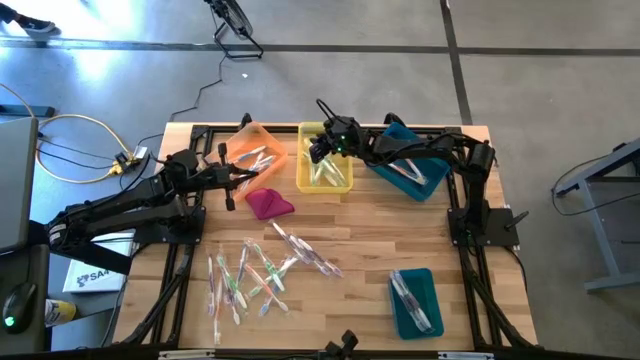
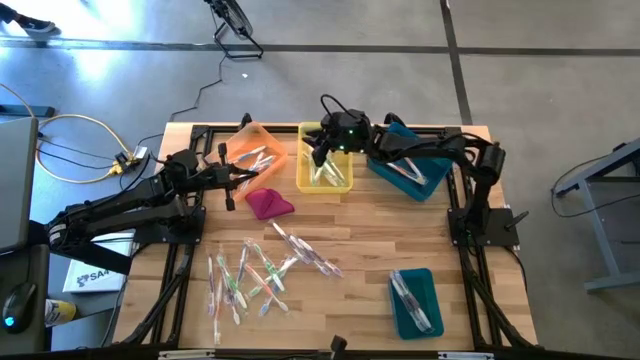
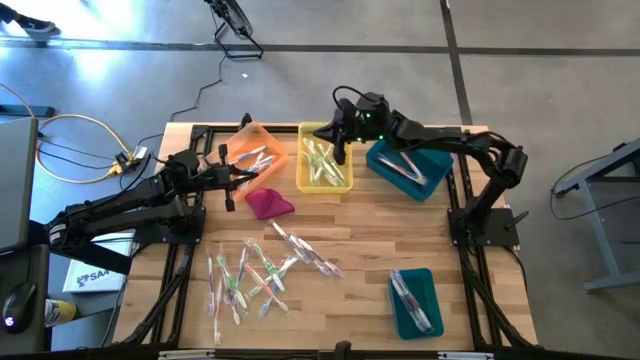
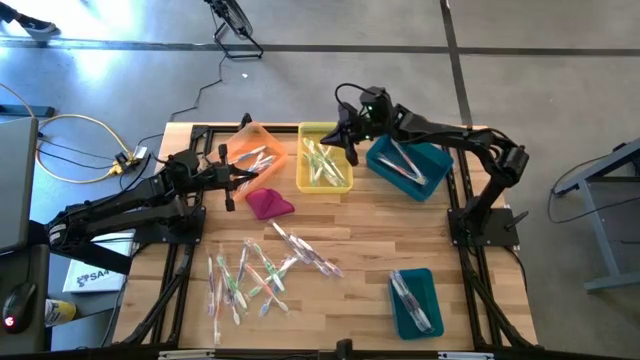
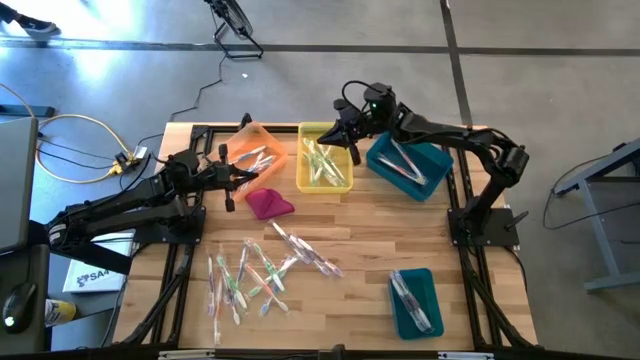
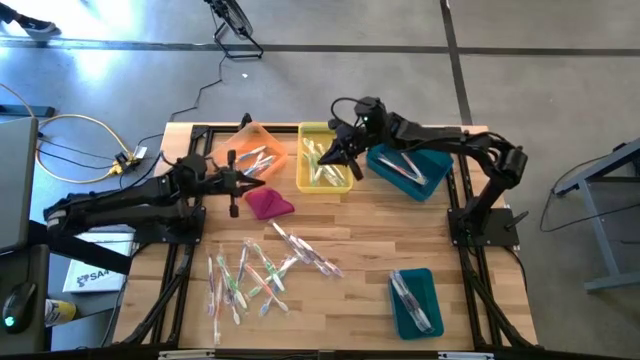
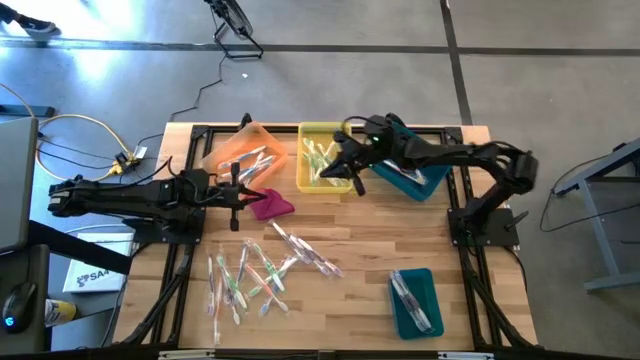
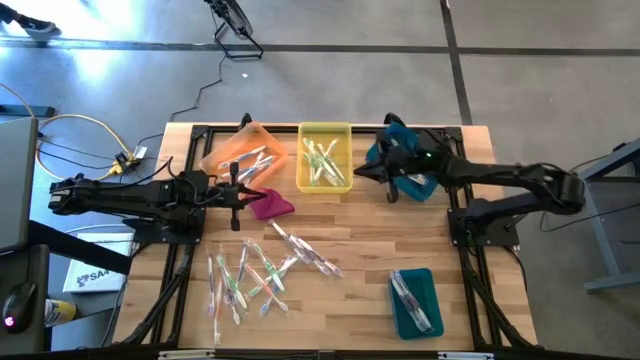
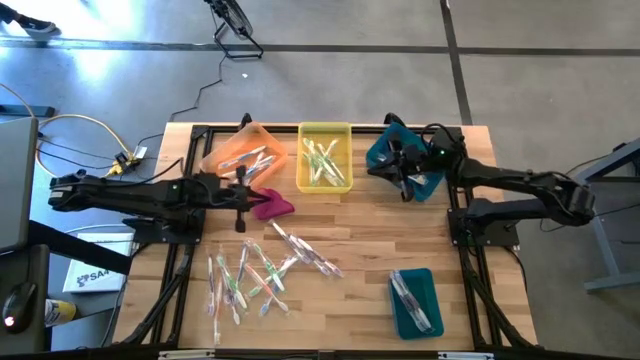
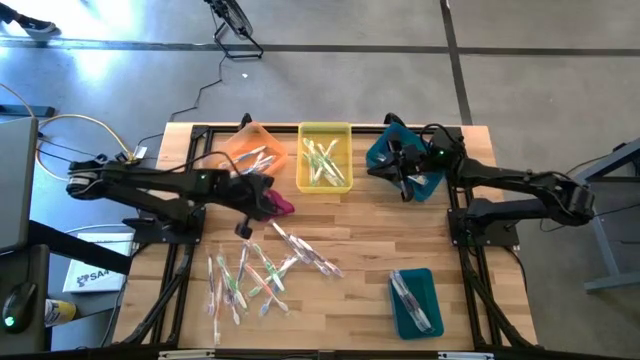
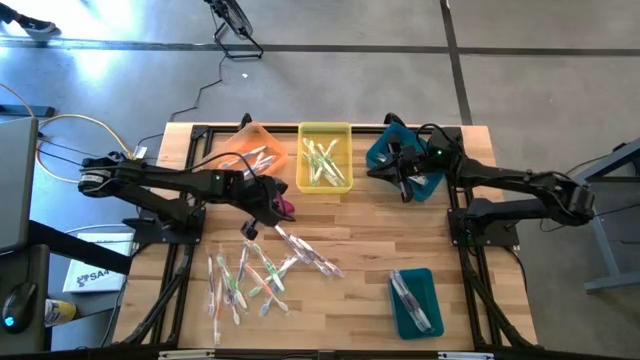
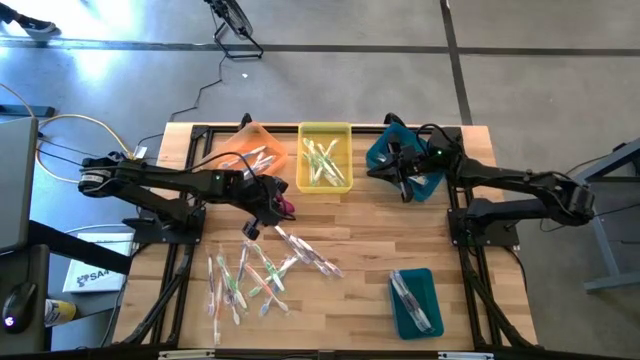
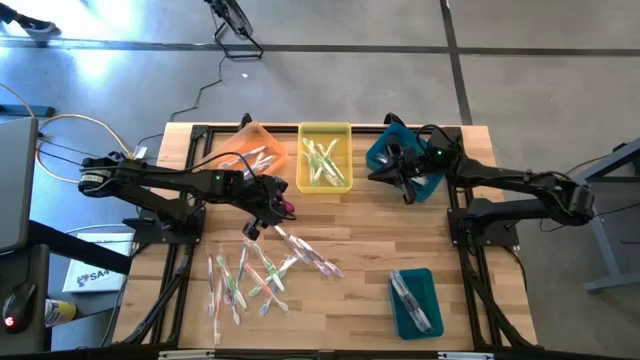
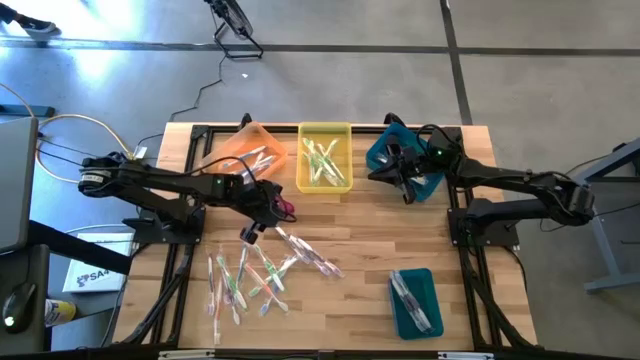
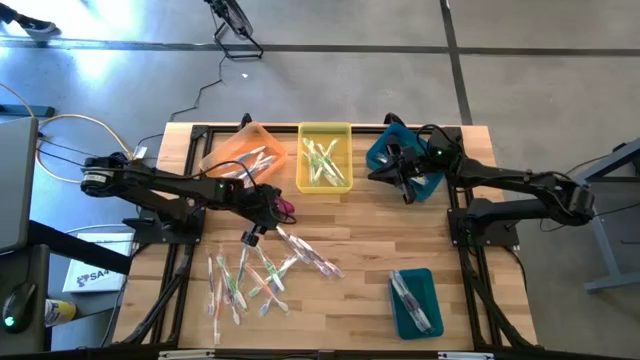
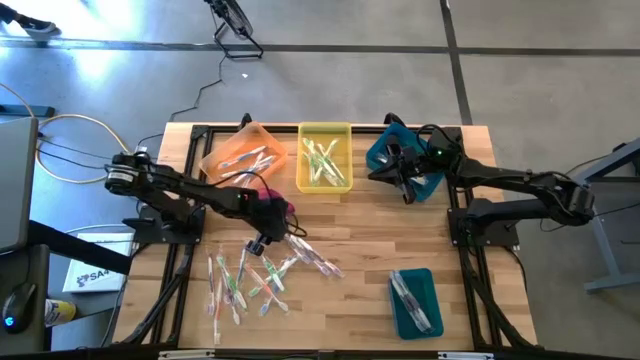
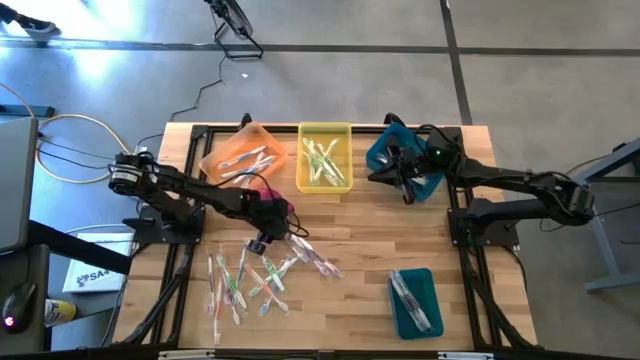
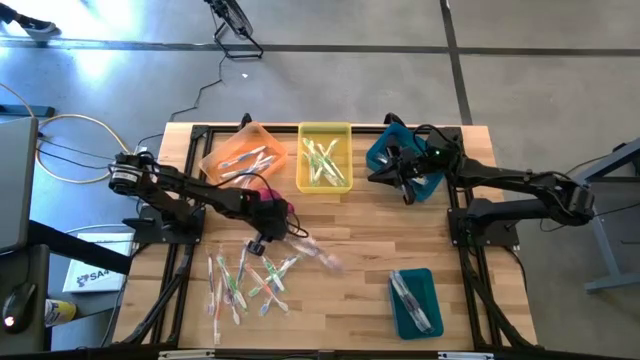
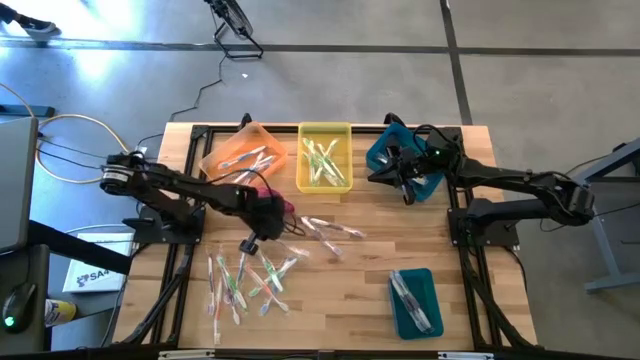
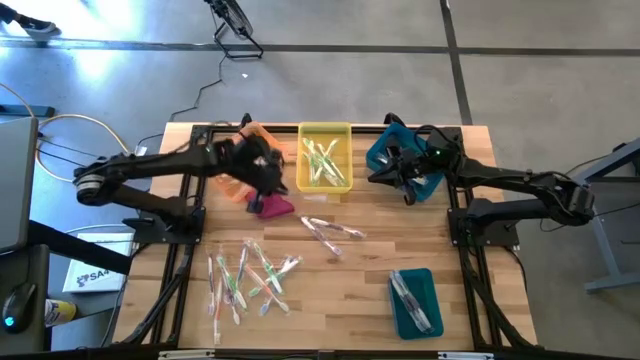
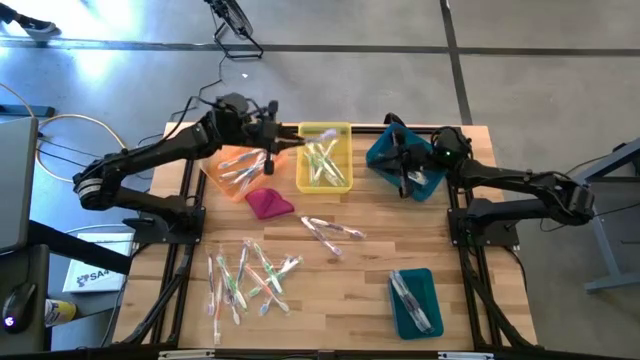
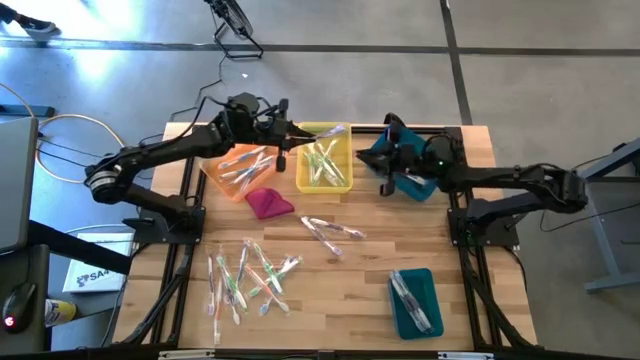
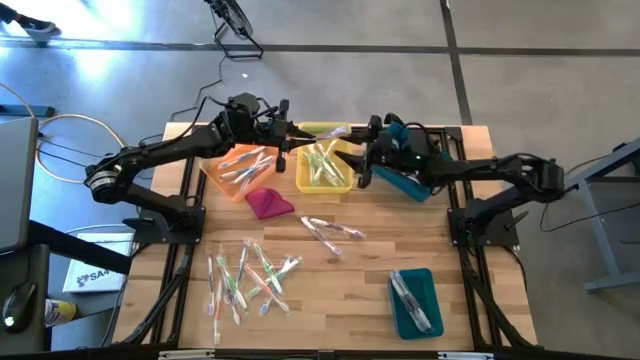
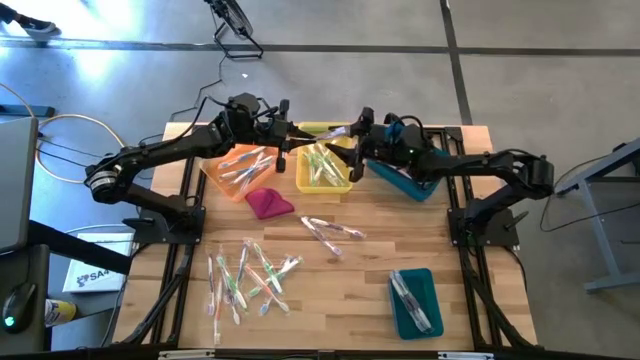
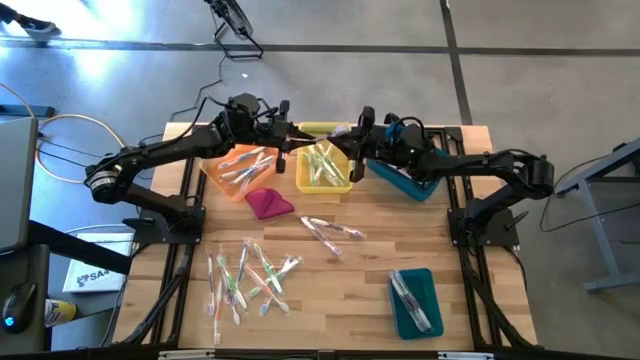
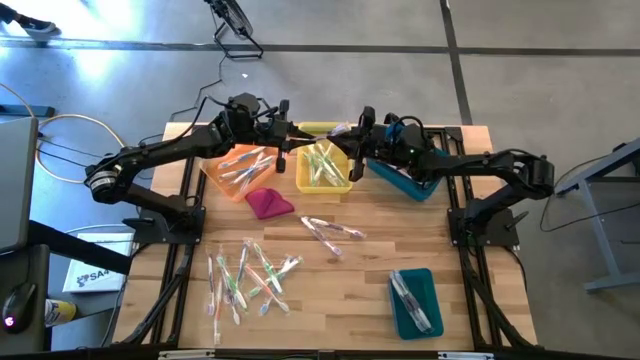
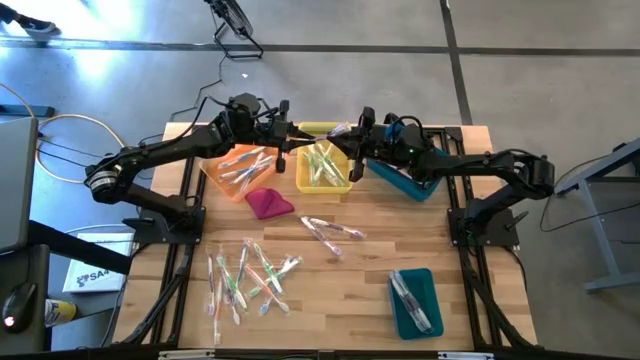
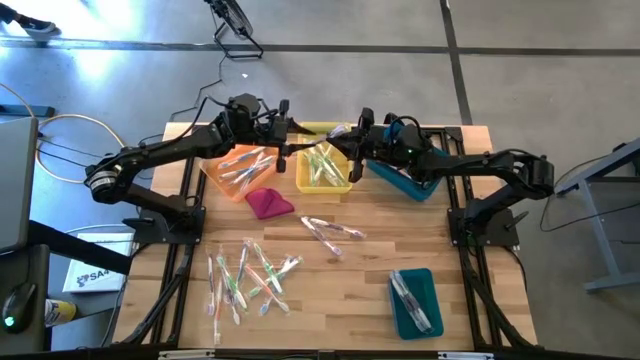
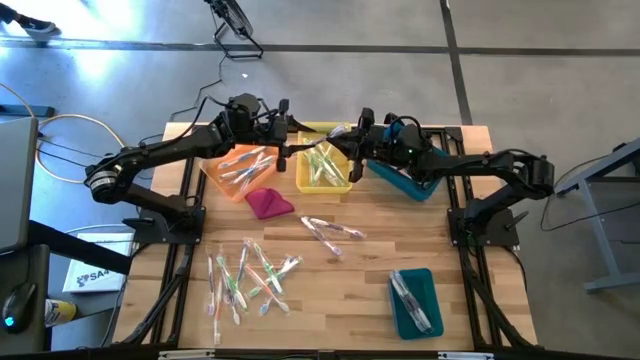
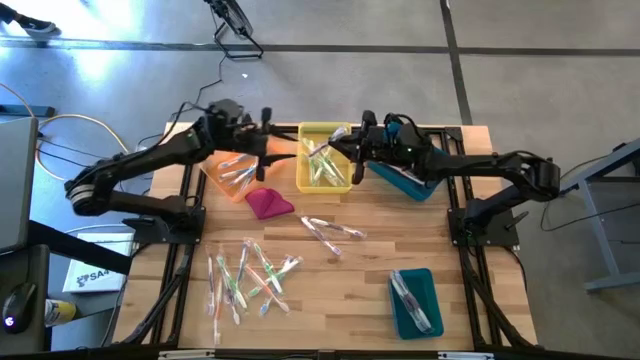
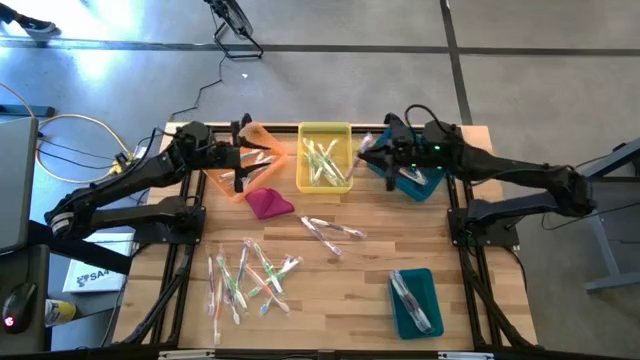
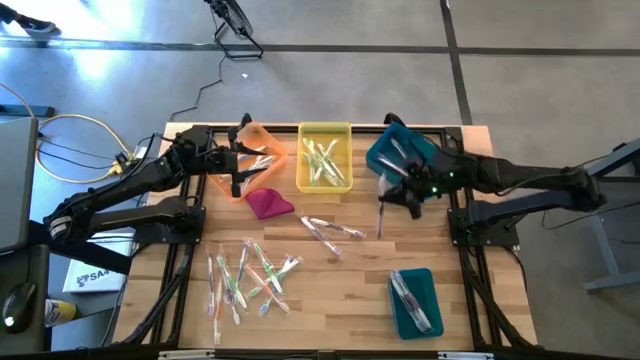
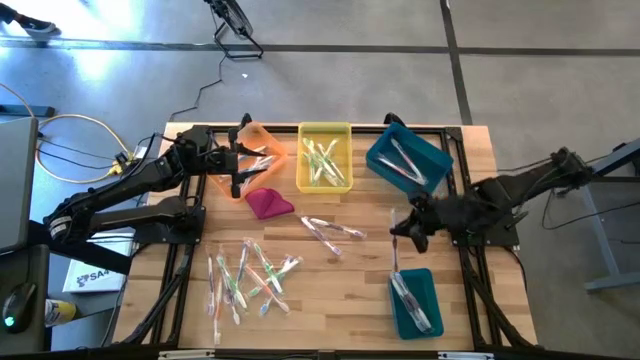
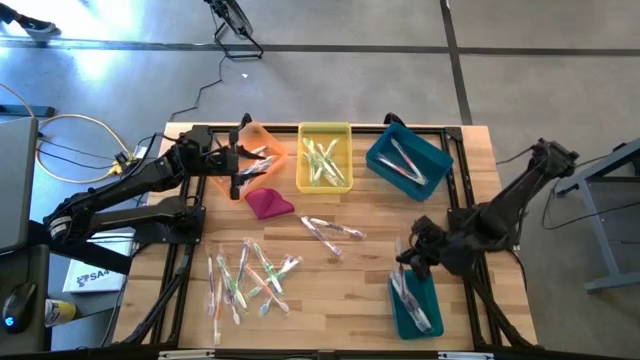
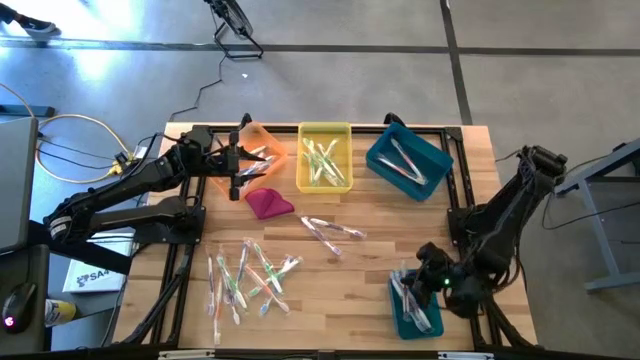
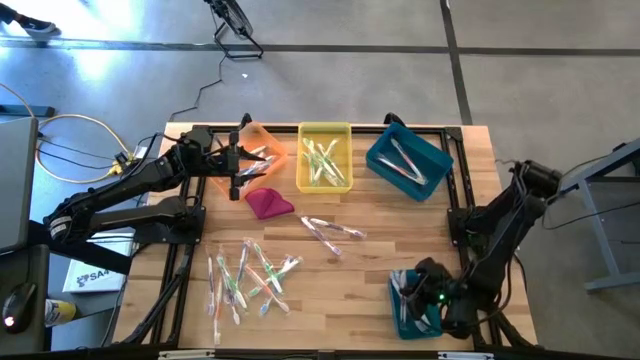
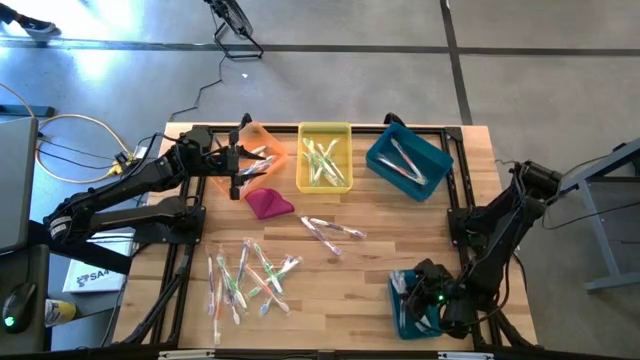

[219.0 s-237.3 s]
Task: Pick & Place Toothbrushes
Put the purple toothbrush into the bottom blue bin

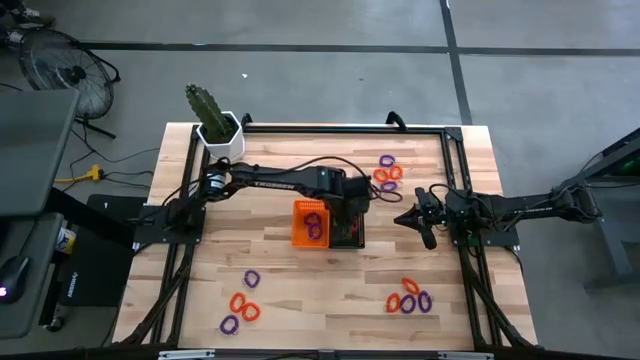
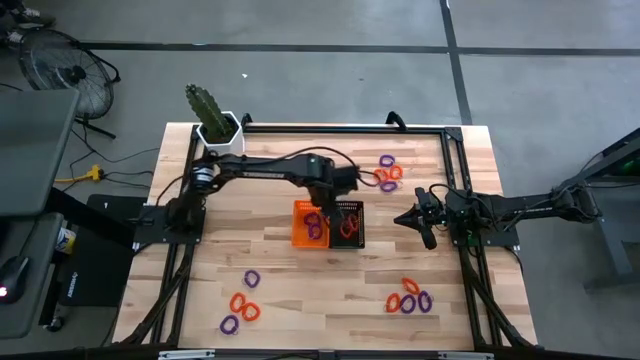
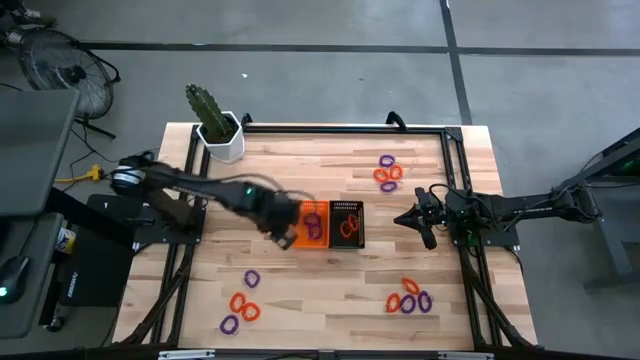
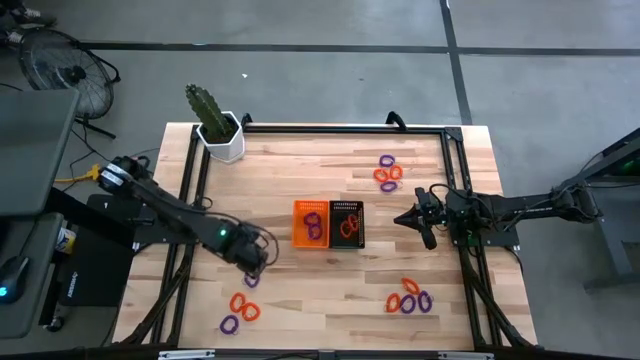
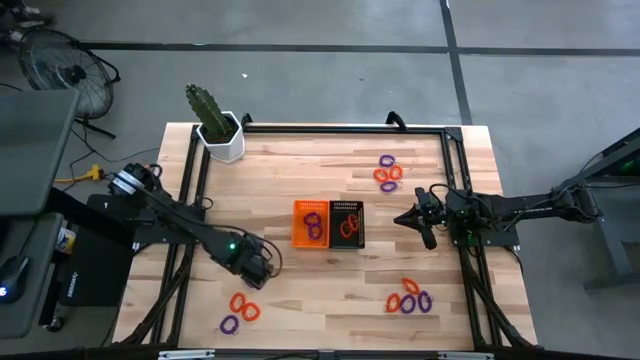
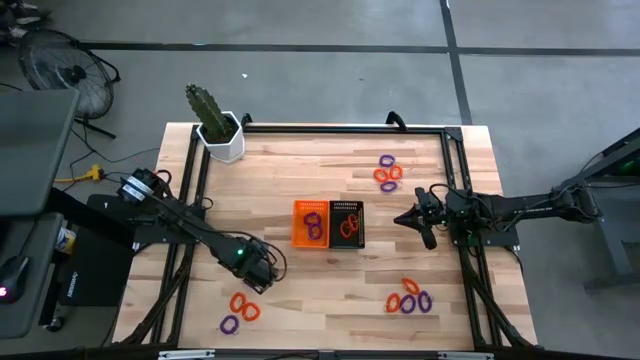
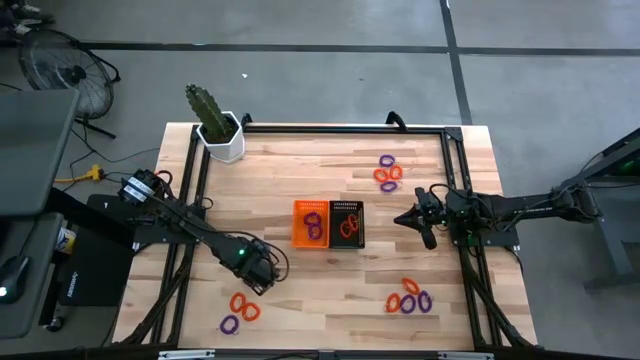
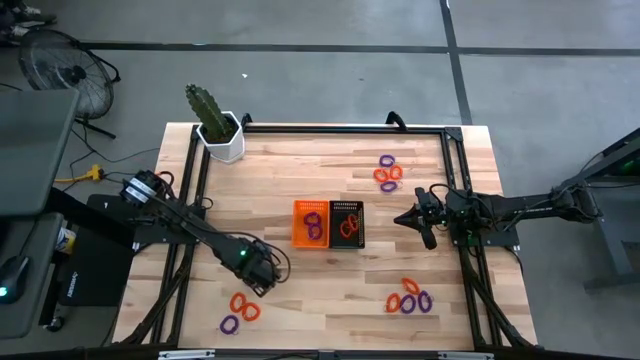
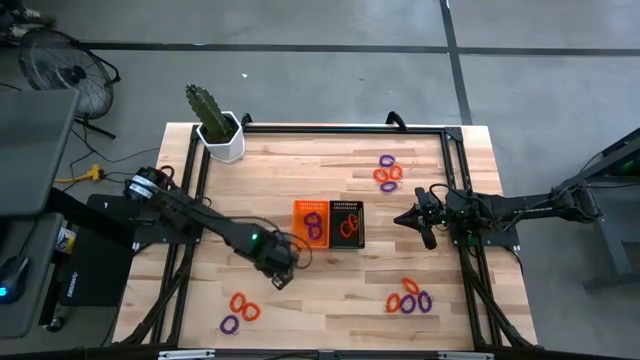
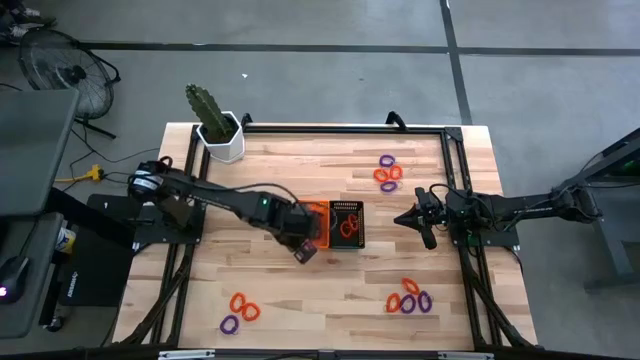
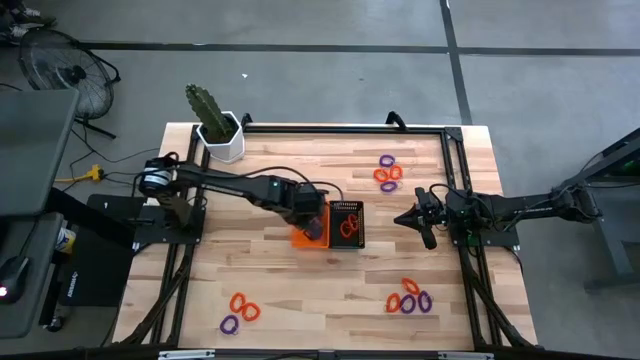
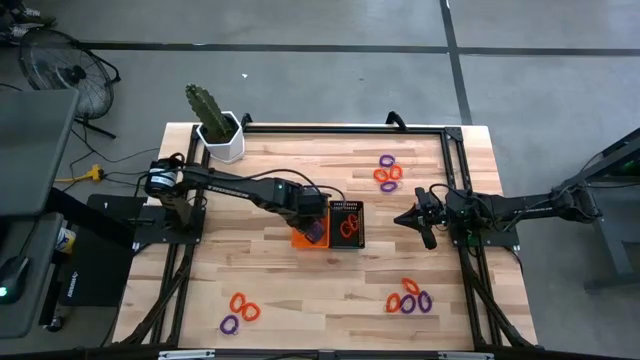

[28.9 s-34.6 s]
Task: Sort spring keychains
Put the violet spring keychain into the orange bin
